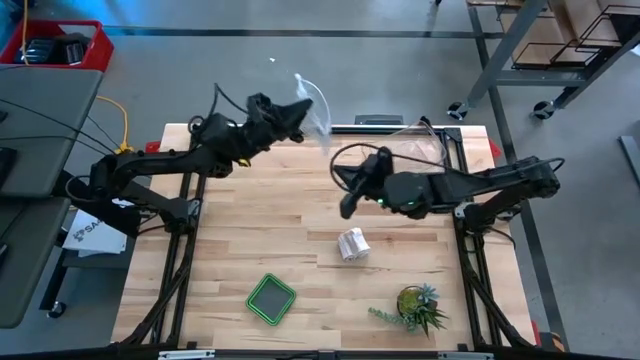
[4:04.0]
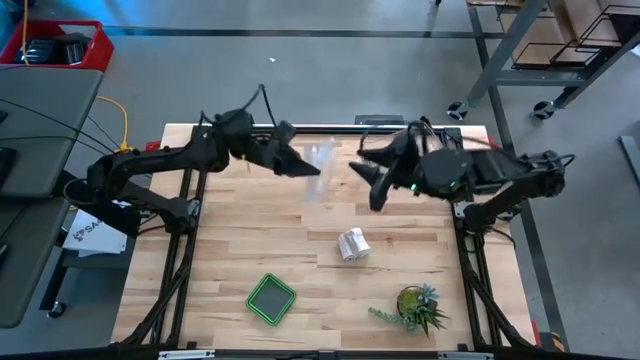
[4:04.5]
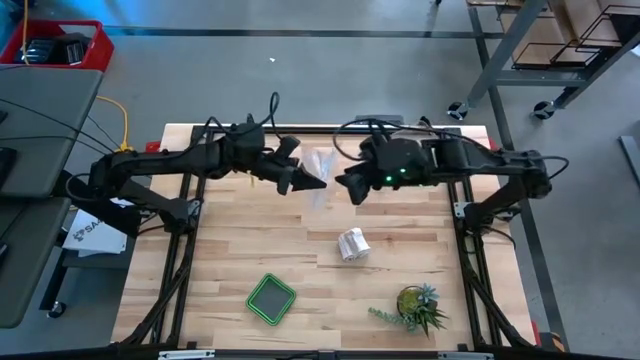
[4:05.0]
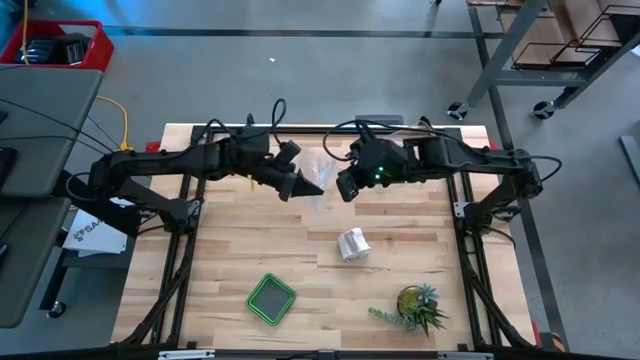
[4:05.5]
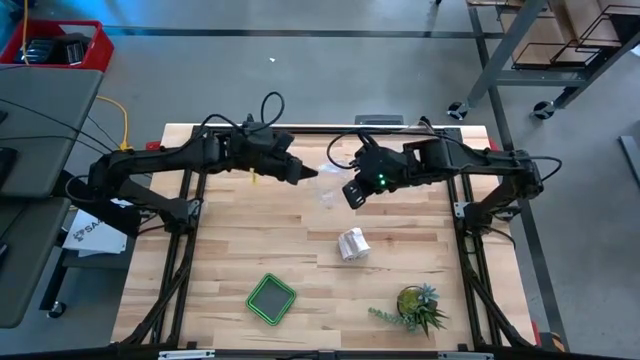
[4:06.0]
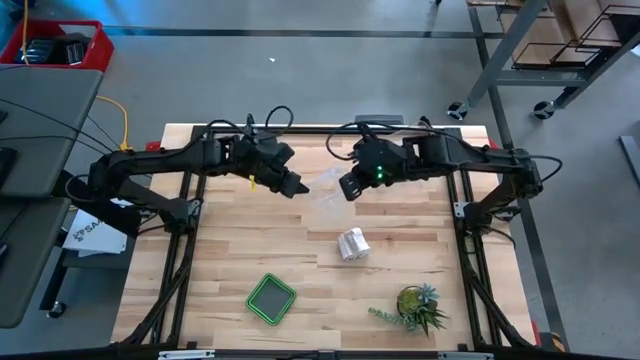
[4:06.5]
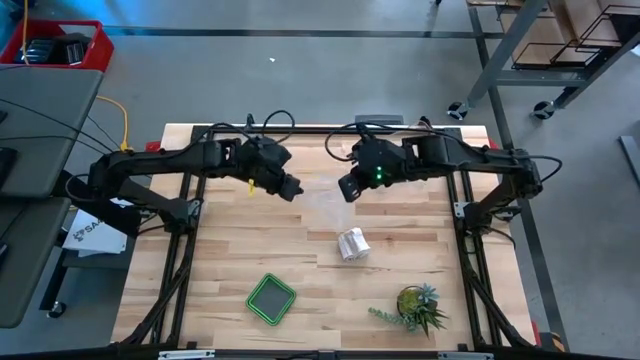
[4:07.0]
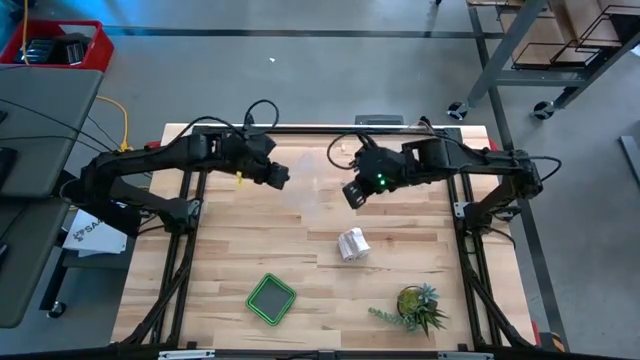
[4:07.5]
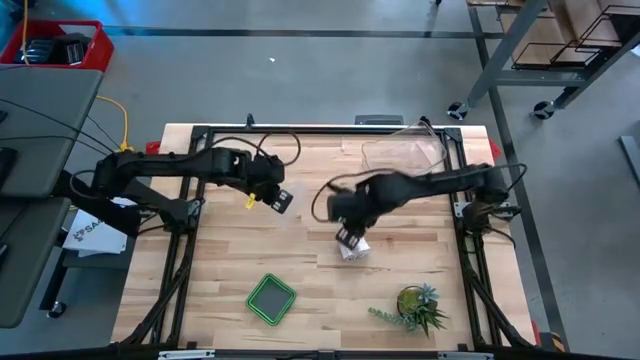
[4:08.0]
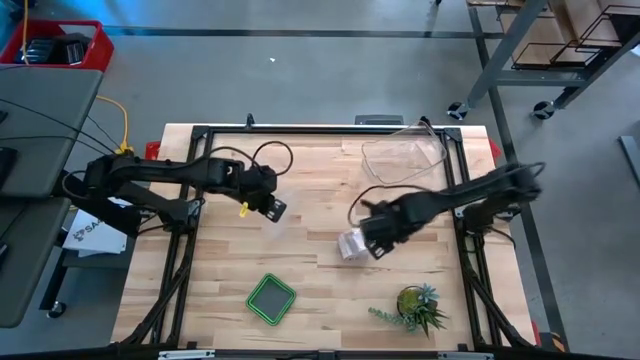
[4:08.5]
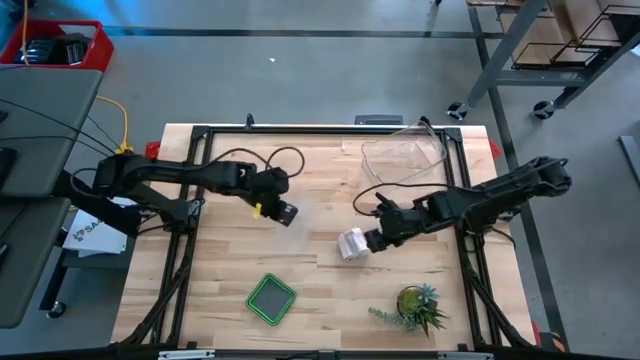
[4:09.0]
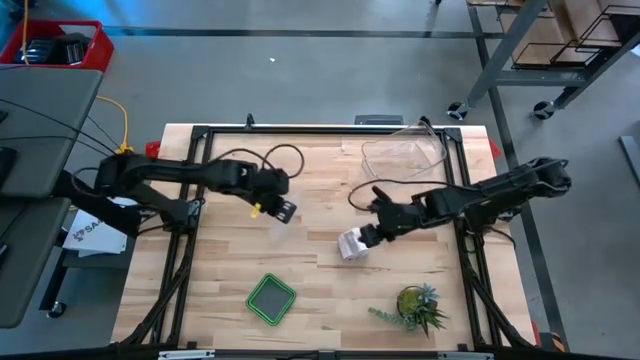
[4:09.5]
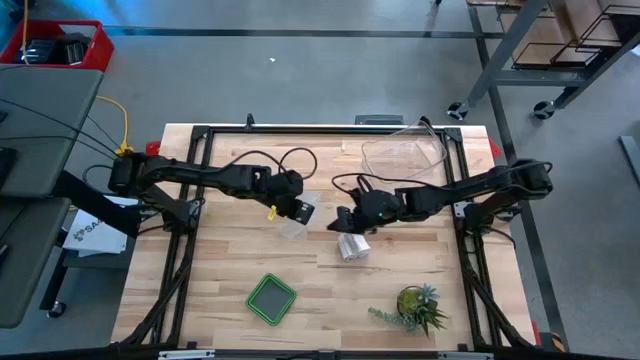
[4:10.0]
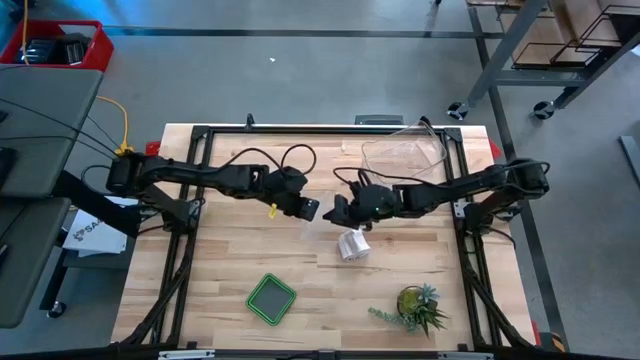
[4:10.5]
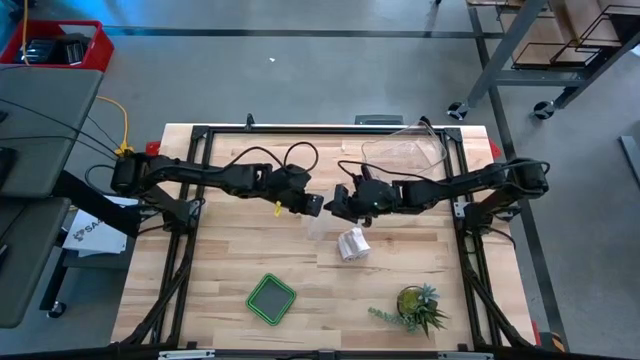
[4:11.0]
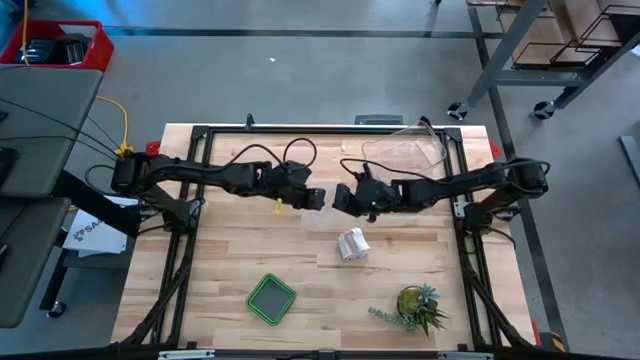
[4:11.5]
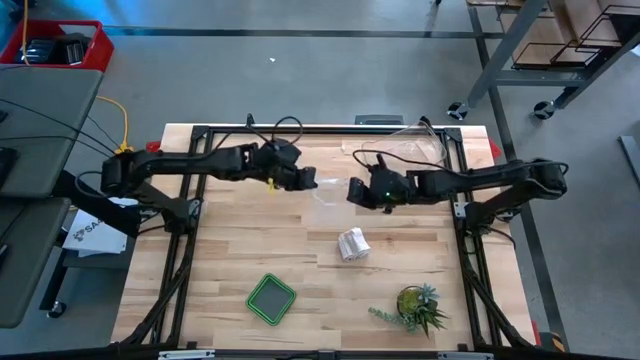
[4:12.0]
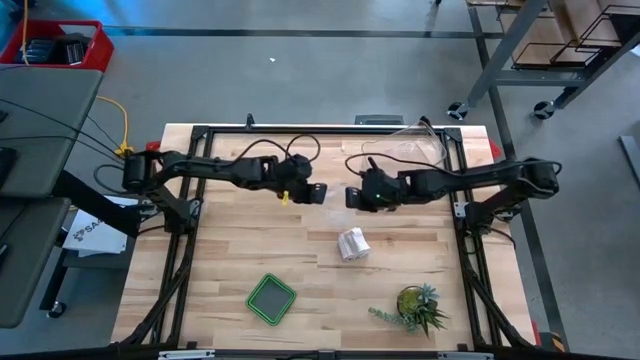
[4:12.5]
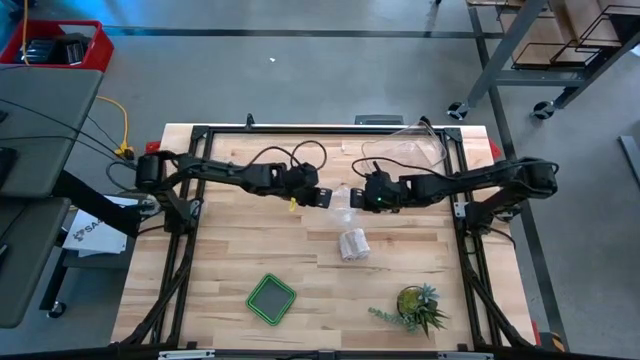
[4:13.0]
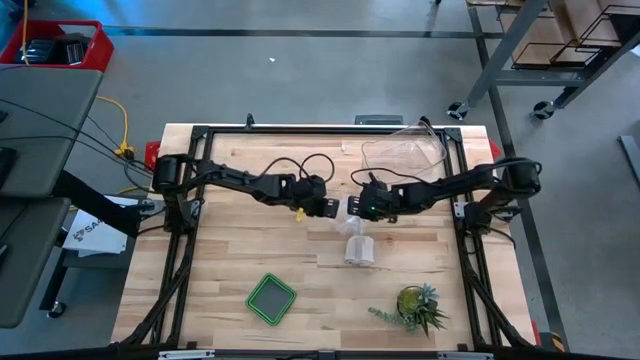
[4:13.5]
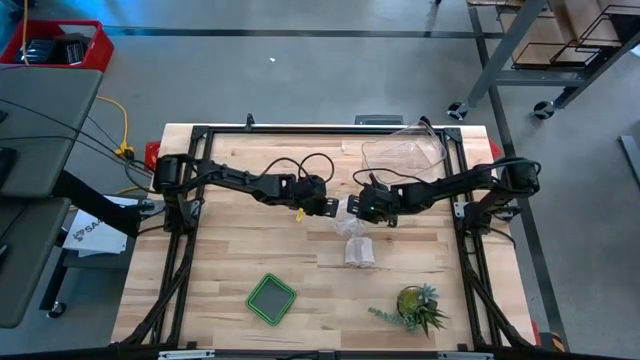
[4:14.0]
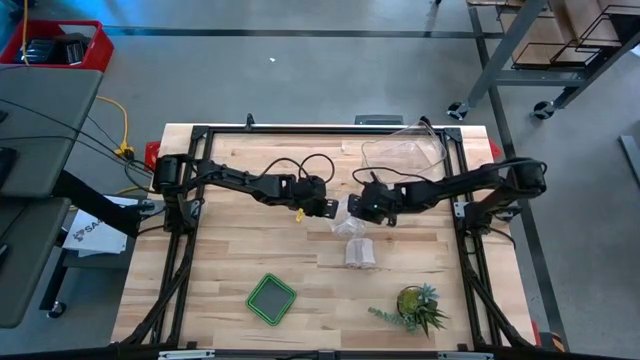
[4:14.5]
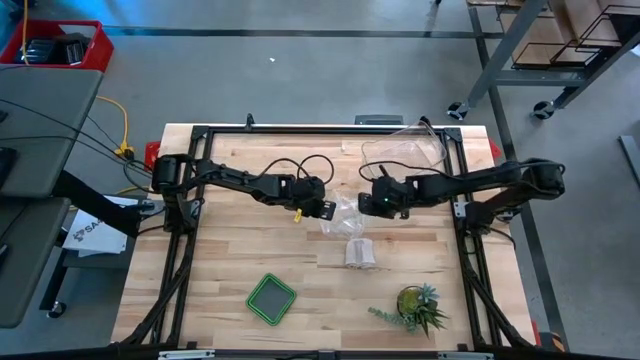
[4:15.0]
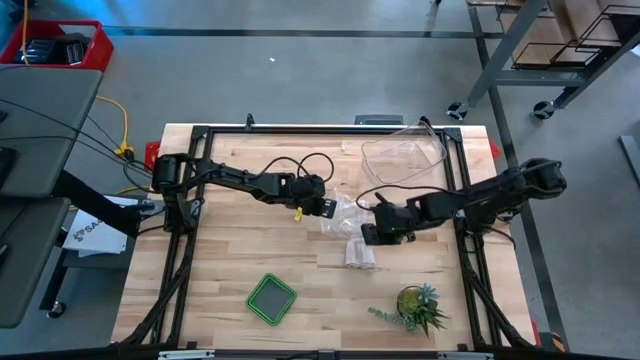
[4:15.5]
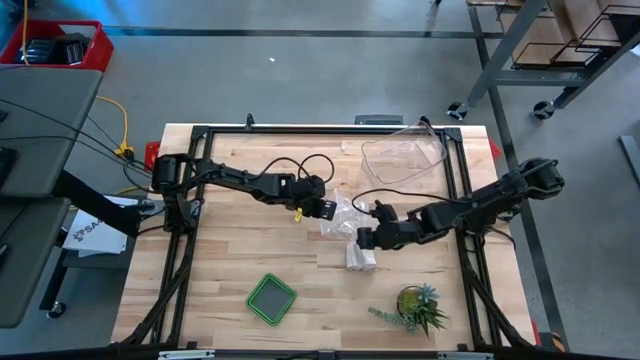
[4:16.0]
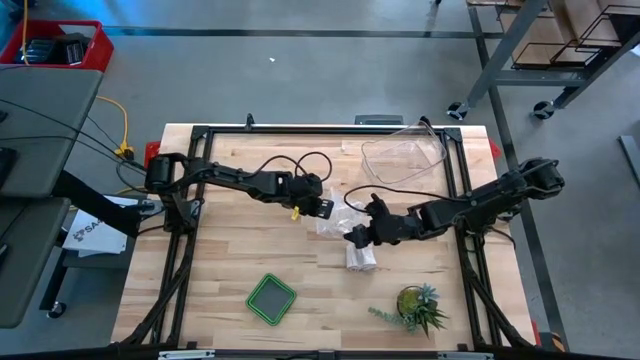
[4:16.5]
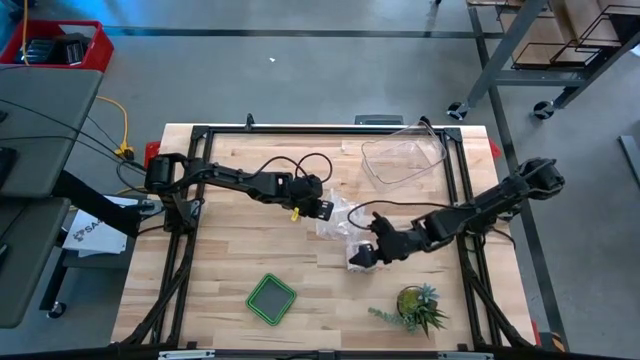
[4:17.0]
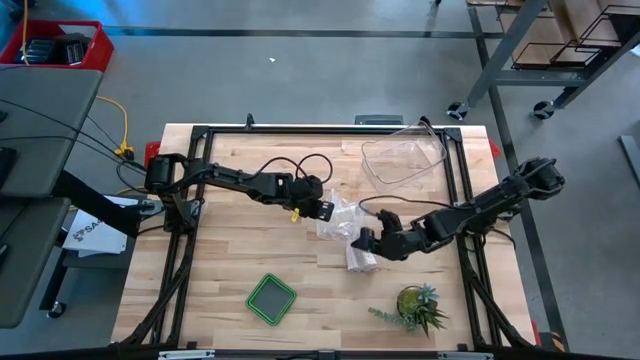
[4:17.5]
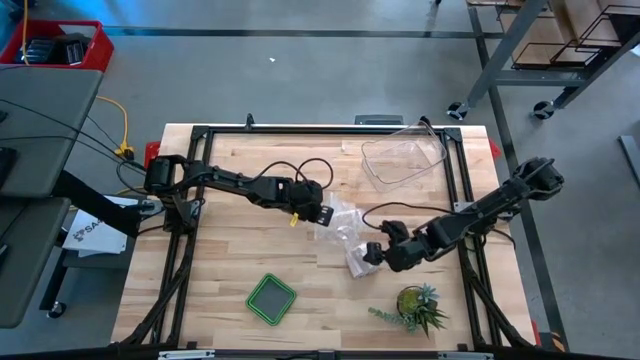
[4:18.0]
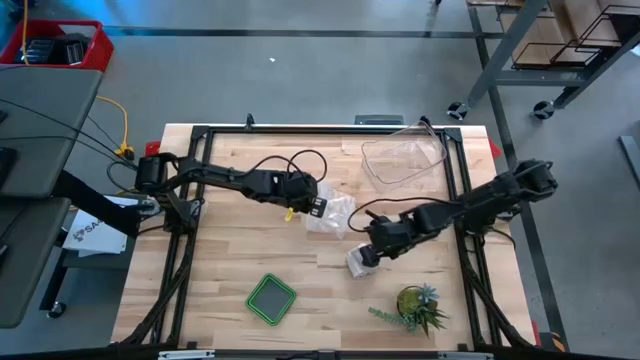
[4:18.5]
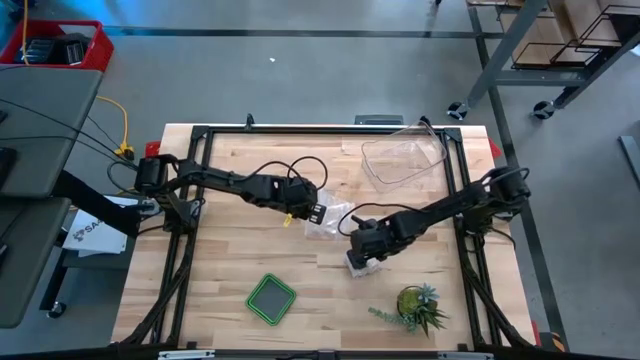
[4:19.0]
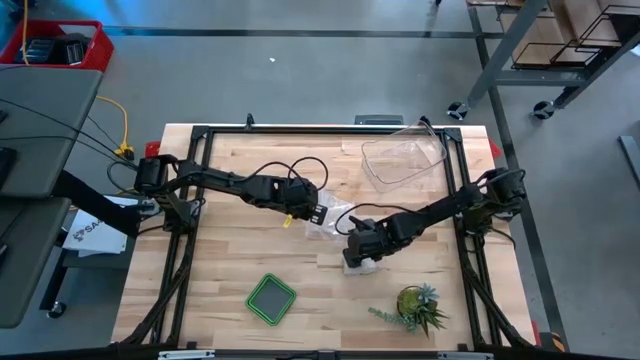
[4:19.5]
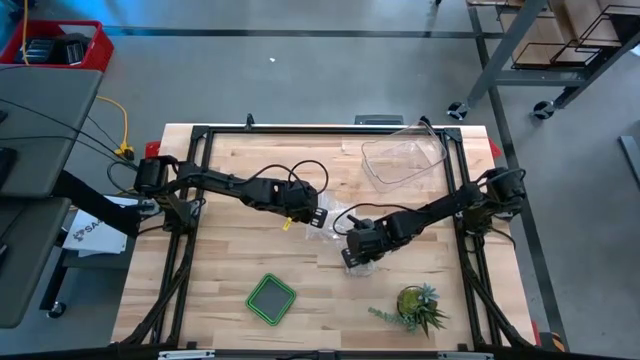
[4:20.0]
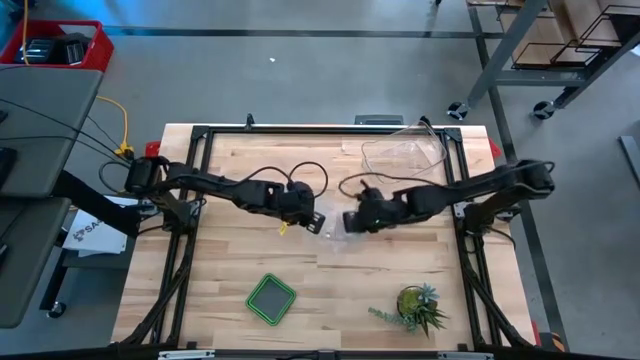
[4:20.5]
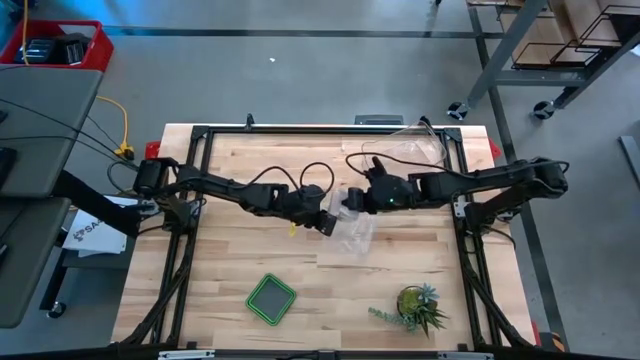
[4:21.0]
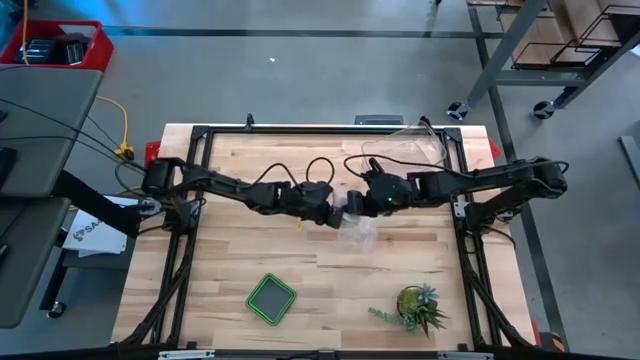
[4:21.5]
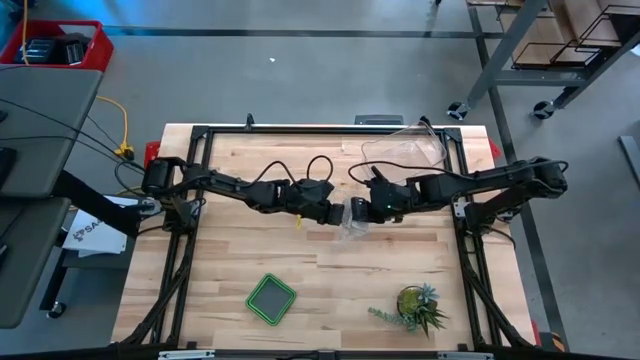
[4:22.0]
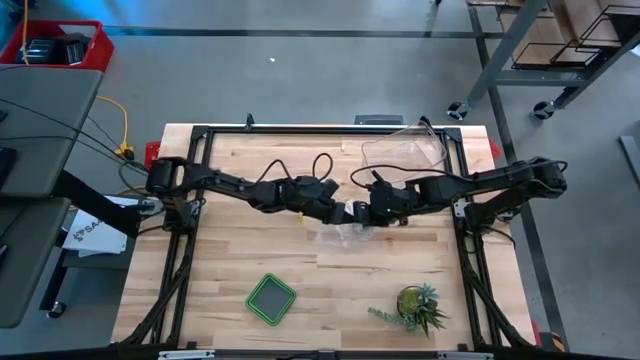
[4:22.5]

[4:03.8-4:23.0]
Task: Roll bandage
Put the rolled white bandage into the transparent zip bag

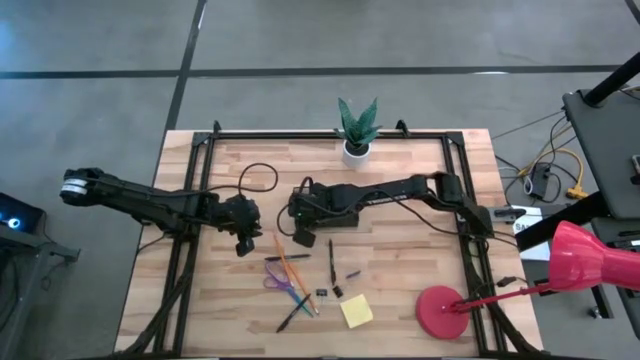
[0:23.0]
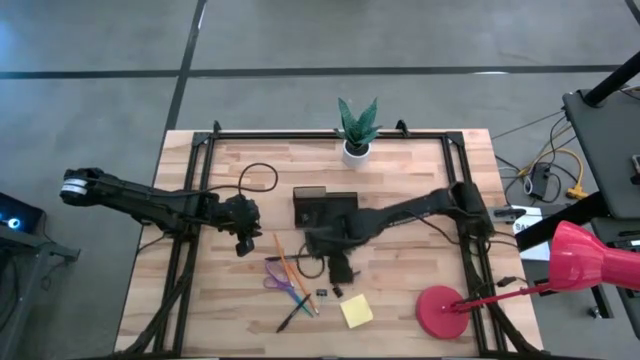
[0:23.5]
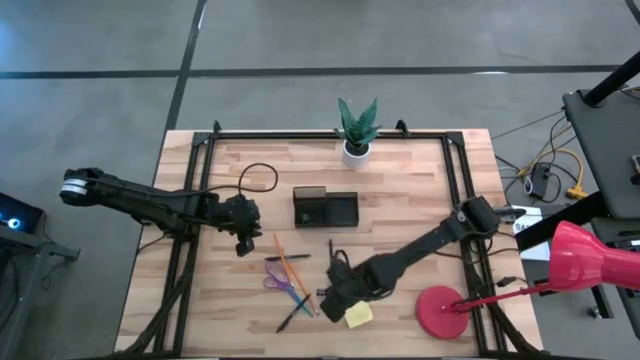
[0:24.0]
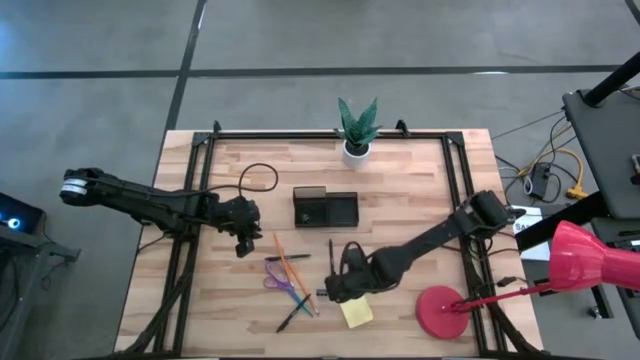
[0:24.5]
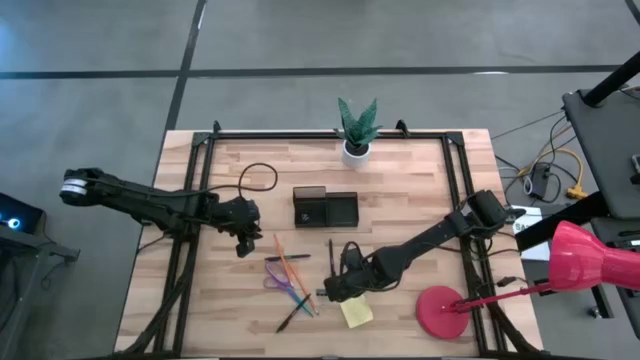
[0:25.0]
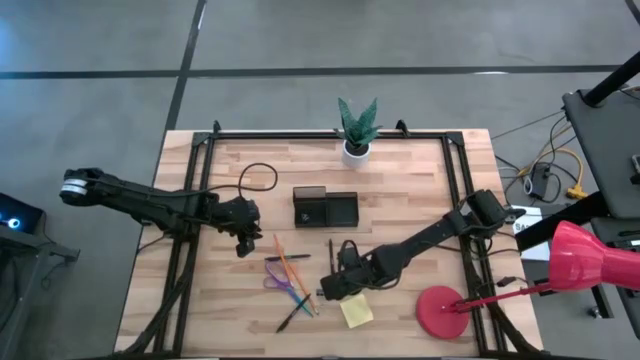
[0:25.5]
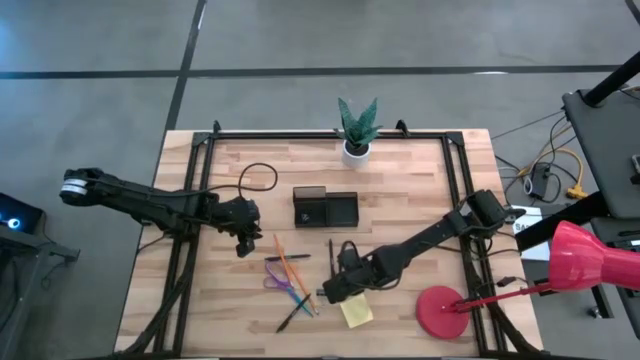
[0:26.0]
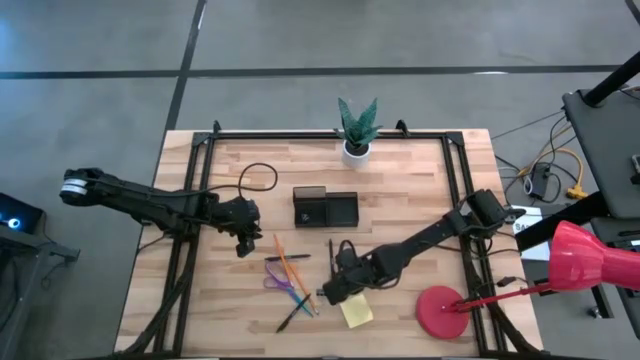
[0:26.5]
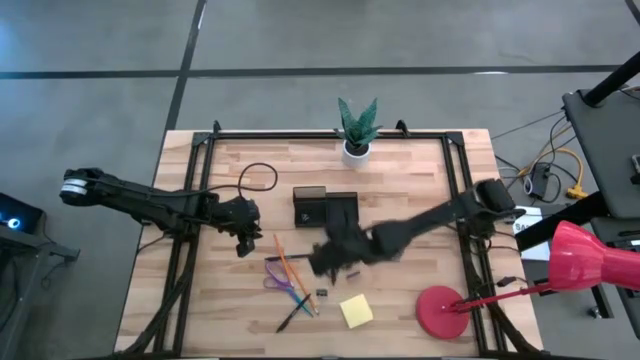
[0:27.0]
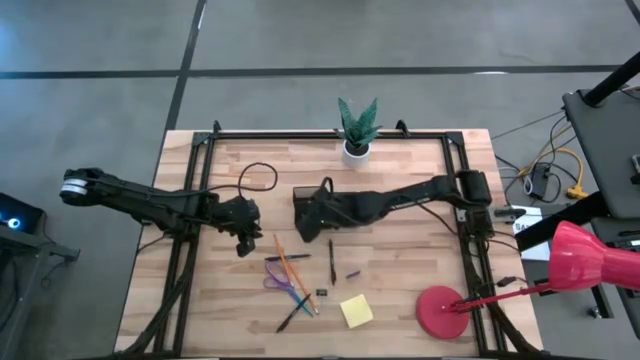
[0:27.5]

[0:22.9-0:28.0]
Task: Pick and place office supplies into organizer
Put the right binder clip into the desk organizer
